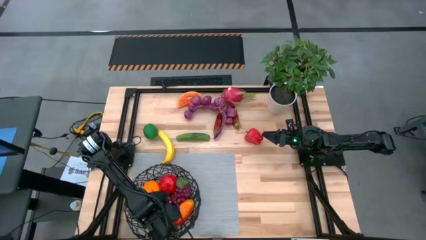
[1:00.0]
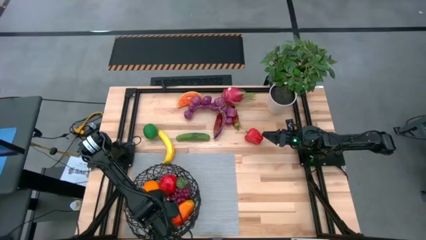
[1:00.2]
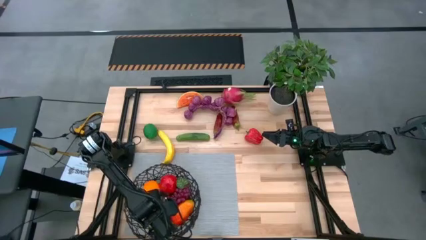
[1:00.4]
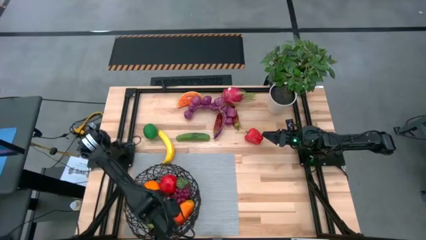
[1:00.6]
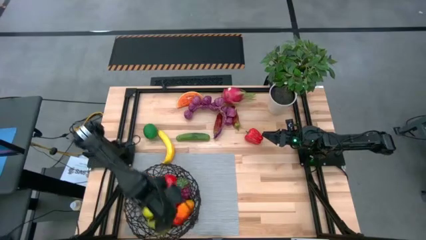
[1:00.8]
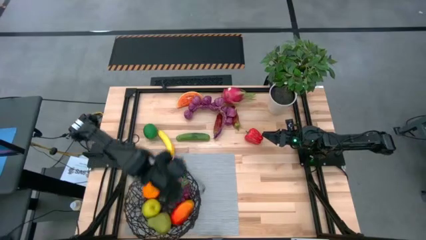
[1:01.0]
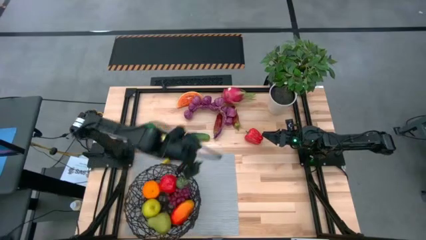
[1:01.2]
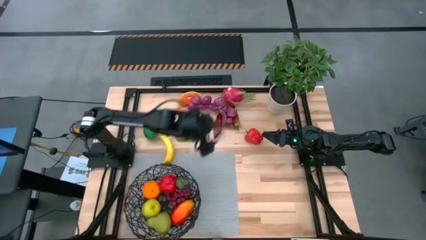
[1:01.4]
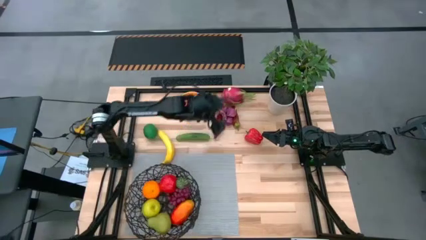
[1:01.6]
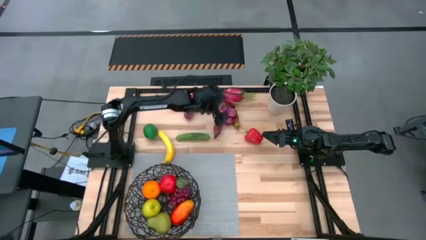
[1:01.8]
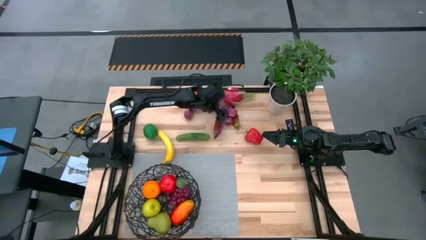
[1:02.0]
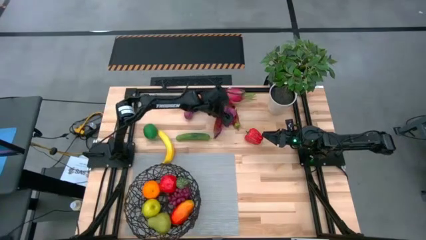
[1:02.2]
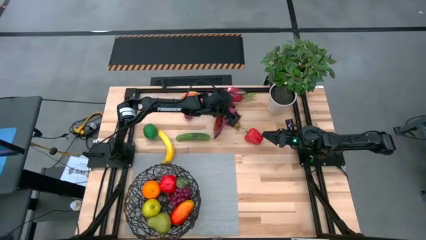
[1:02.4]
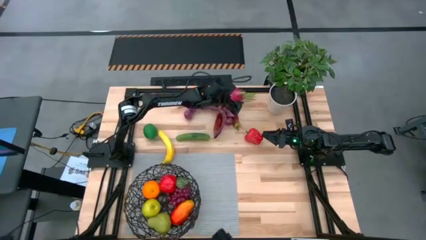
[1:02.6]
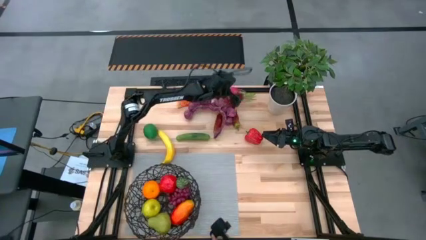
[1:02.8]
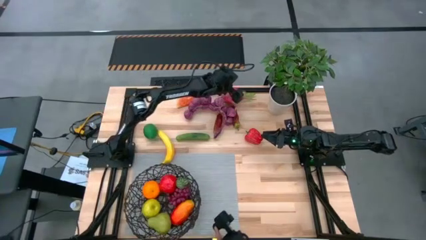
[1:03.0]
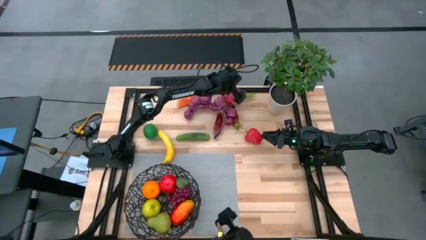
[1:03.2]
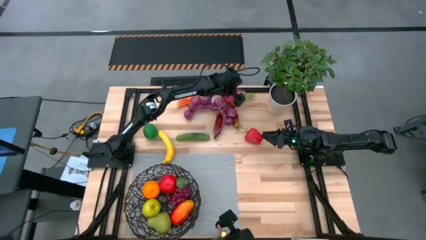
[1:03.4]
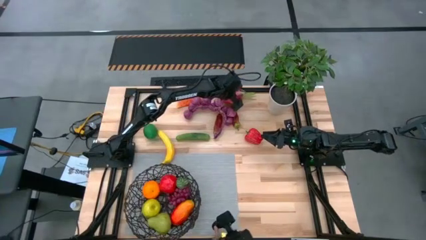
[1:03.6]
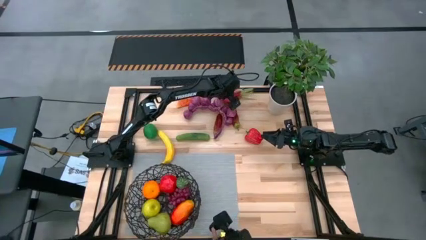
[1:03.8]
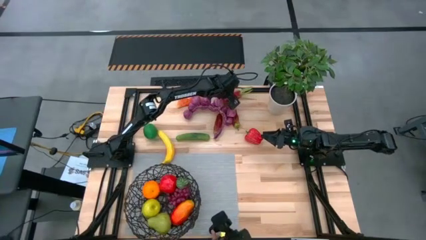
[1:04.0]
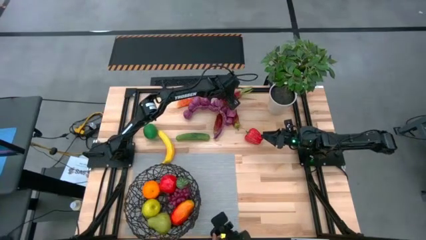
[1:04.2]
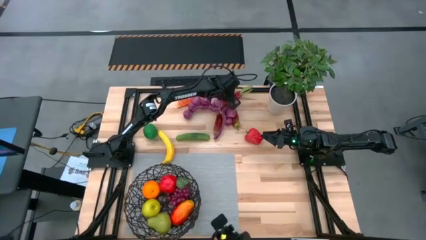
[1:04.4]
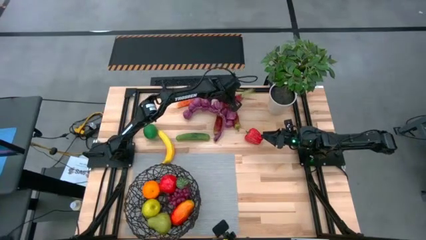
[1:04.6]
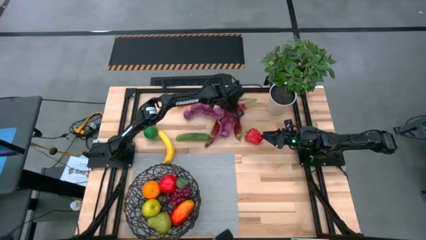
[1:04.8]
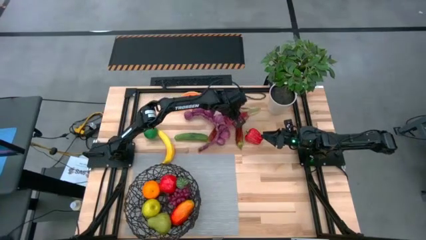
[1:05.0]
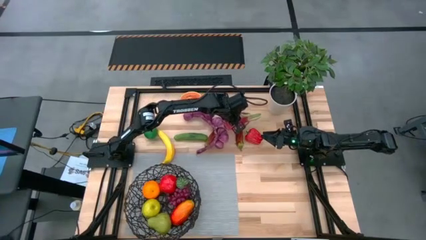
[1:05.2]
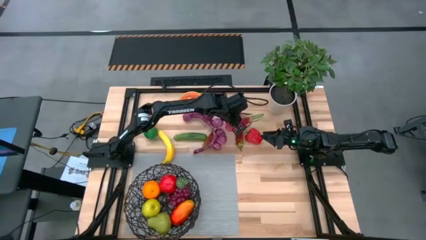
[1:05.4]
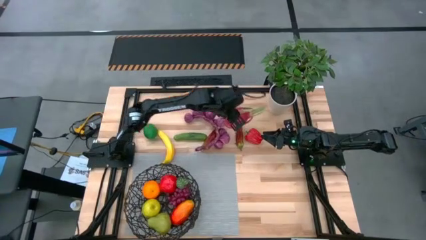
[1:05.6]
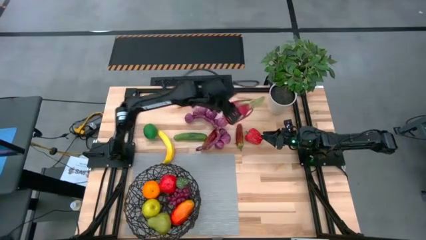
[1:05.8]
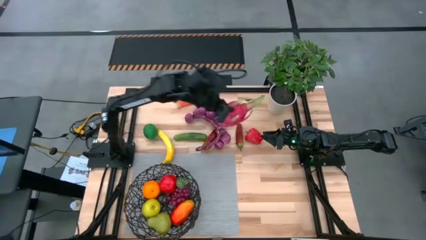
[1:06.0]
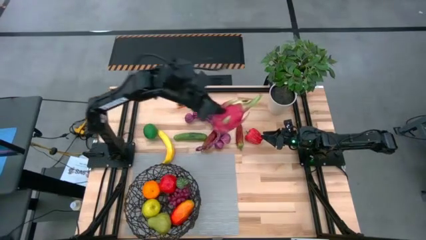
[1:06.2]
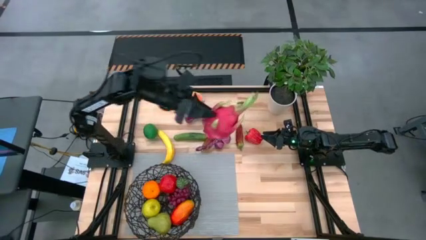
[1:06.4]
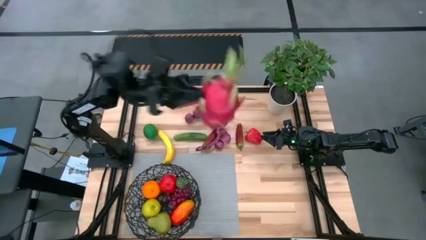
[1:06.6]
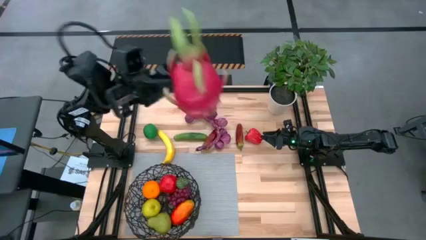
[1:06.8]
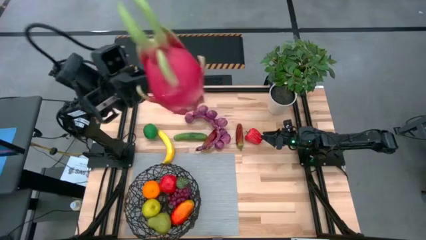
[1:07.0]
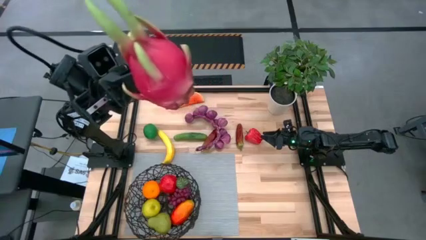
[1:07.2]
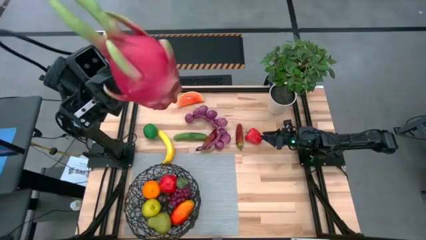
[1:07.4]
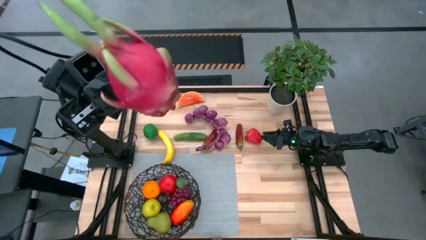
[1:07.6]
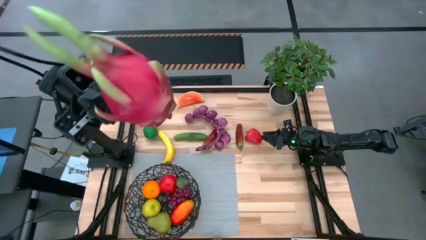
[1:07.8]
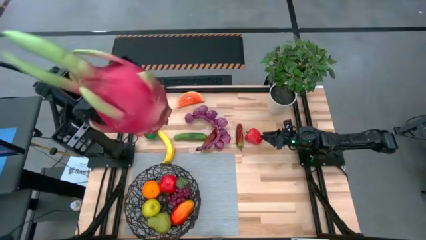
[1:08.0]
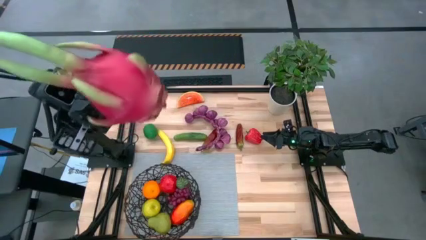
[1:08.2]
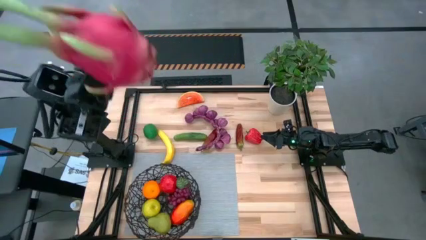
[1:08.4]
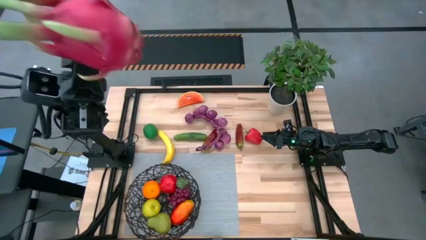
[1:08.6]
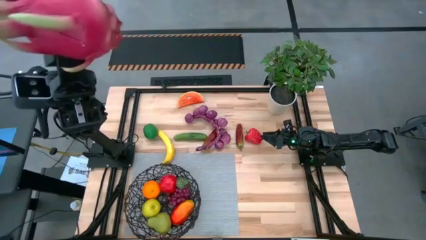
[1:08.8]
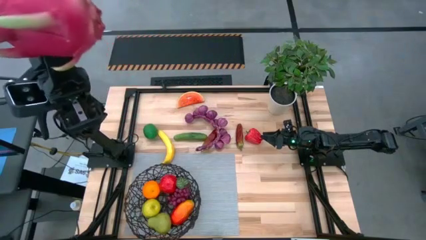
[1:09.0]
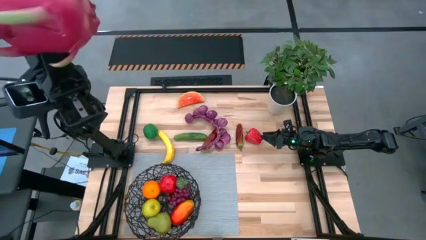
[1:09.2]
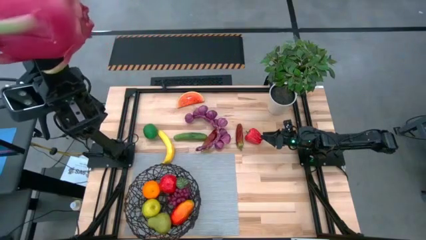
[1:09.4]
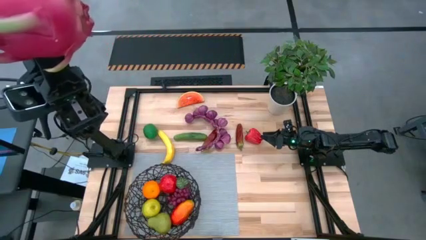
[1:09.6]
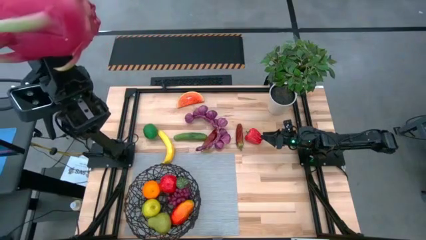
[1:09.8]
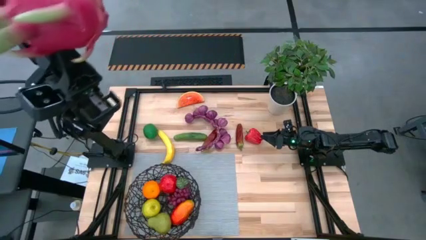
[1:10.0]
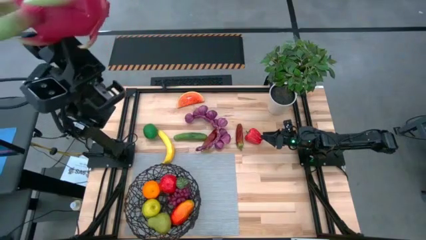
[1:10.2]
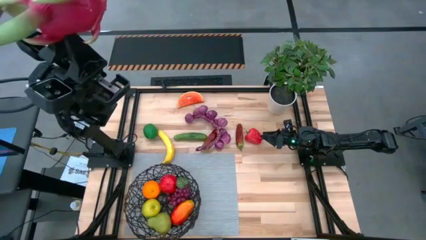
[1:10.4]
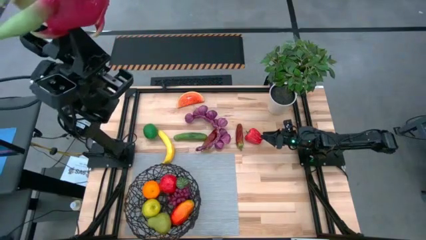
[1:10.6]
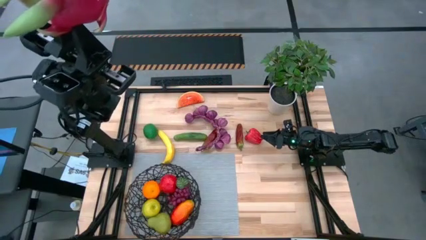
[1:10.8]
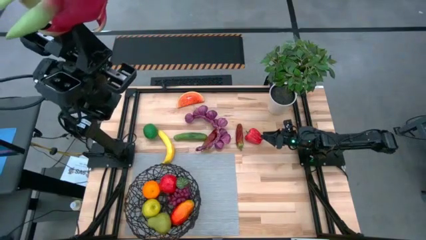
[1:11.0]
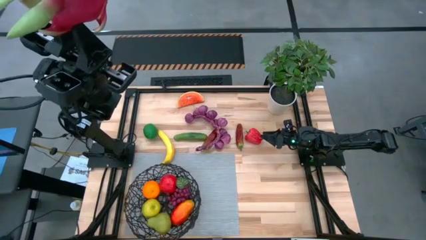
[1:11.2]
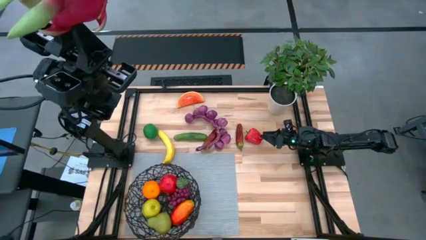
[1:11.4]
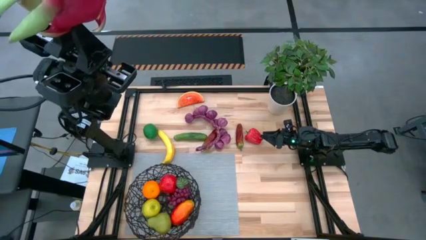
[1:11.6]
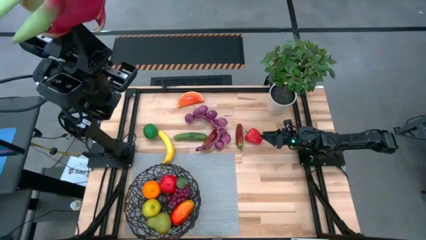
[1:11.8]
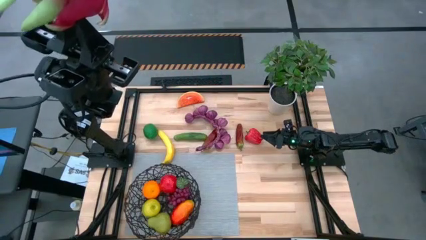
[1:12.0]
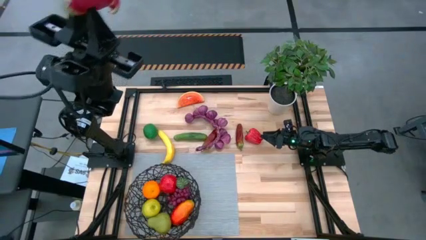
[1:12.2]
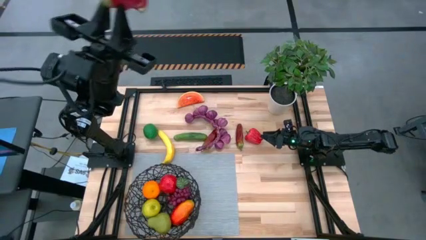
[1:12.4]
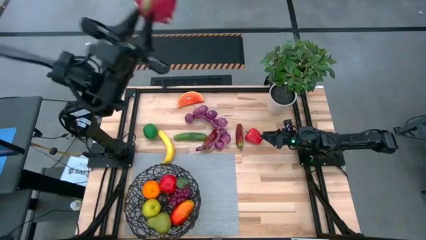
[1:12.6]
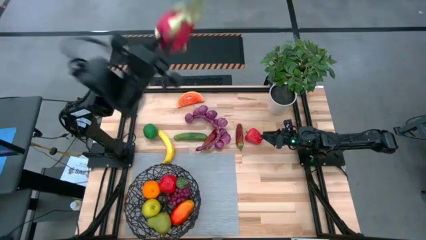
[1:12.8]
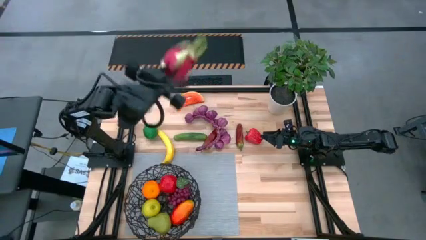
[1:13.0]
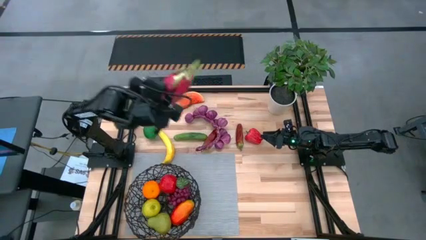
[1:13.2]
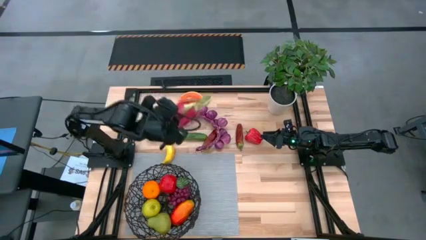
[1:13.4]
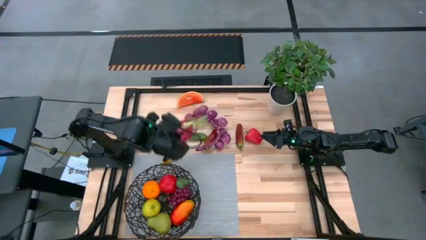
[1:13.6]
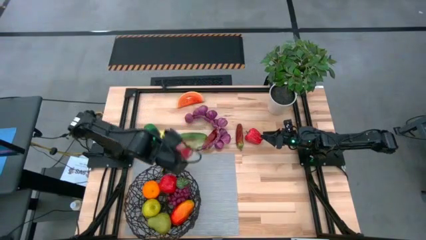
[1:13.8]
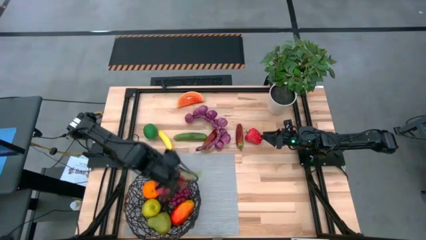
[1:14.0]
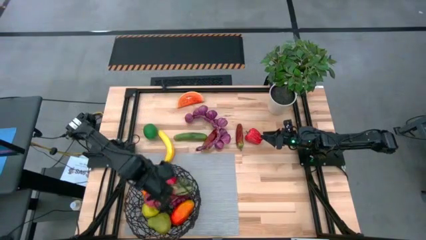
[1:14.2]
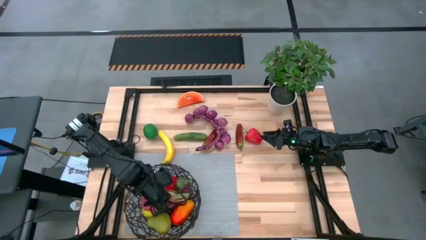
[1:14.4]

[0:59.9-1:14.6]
Task: Build produce basket
Put the dragon fruit into the black wire basket

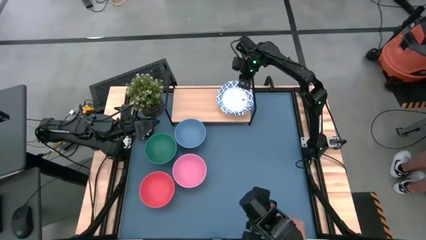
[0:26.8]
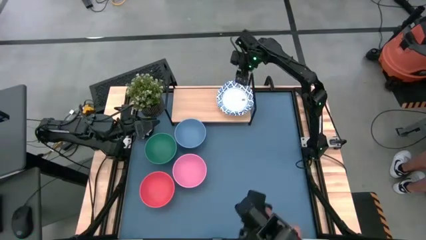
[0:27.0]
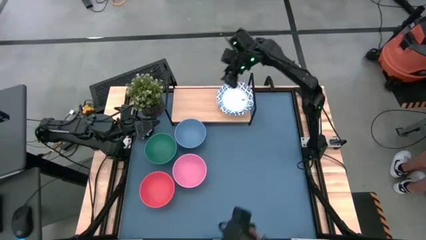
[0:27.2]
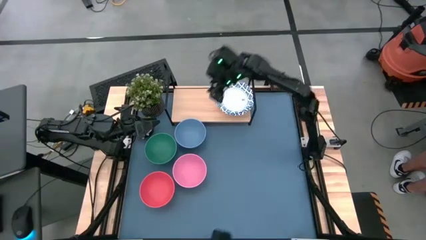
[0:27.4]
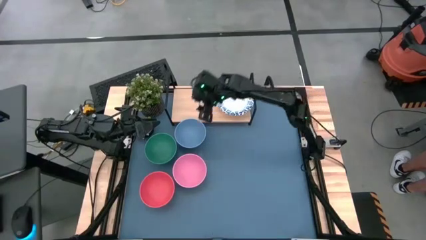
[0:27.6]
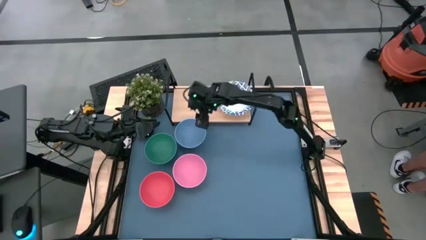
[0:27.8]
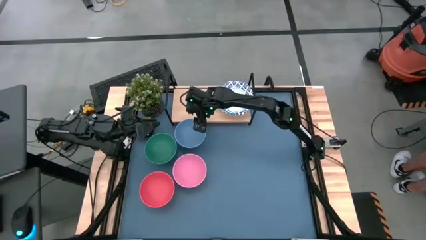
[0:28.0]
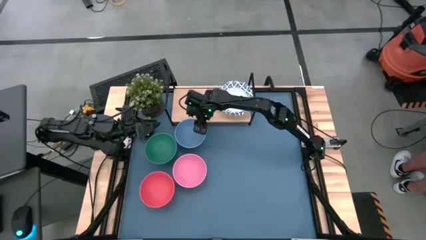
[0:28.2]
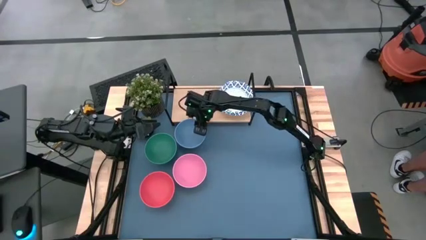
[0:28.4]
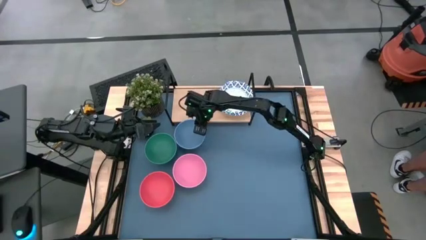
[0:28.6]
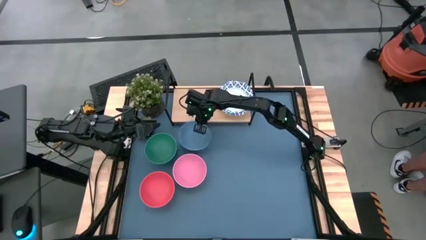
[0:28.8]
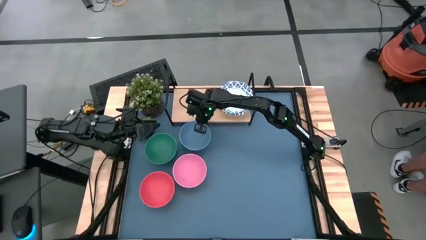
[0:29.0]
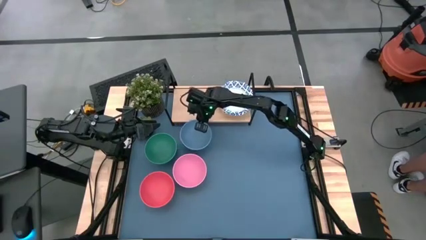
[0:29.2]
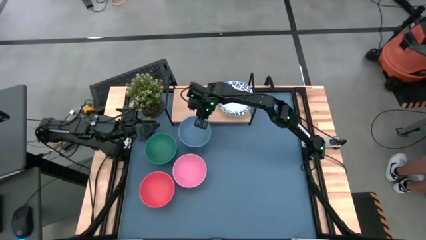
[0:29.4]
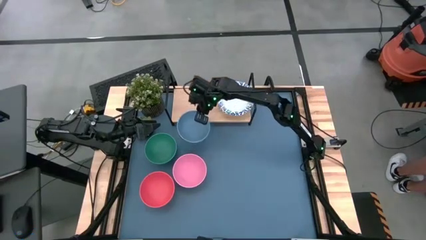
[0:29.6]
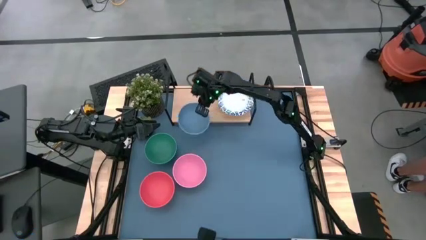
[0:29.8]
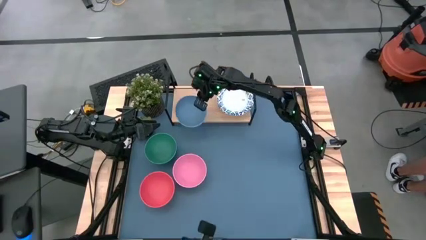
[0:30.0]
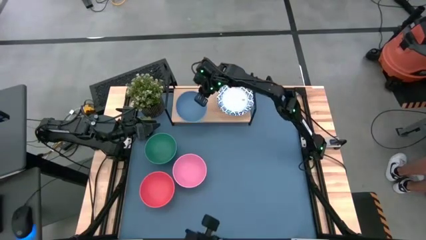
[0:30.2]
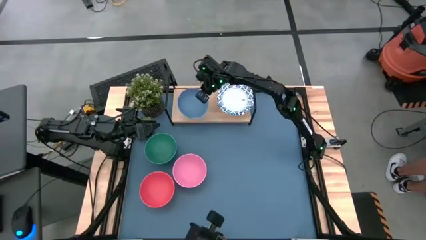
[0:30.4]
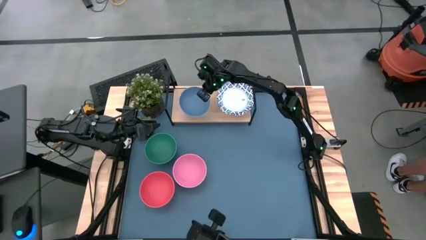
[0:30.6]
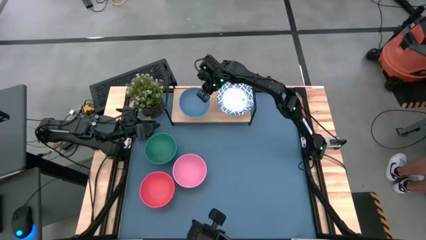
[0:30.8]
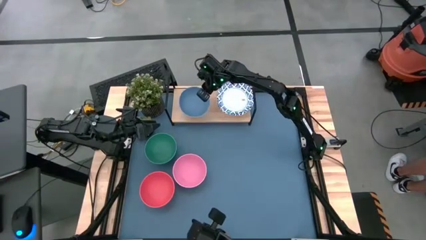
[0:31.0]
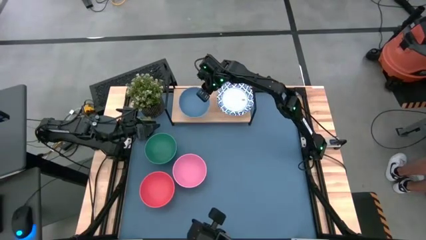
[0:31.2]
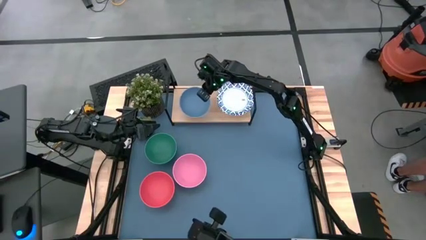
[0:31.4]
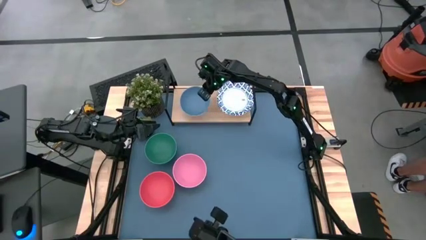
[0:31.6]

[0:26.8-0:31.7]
Task: Place and stack bowls onto a shelf
Put the blue bowl on the shelf
